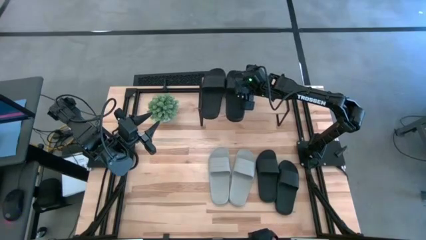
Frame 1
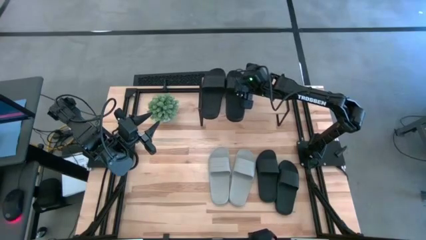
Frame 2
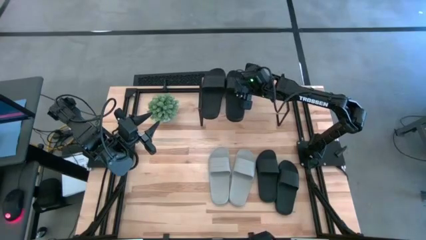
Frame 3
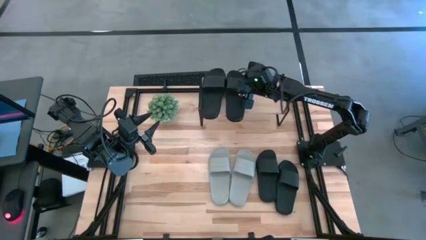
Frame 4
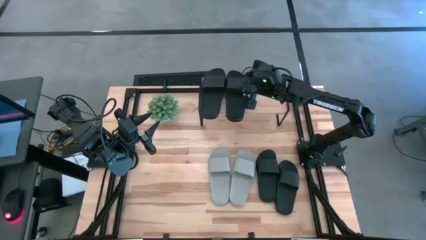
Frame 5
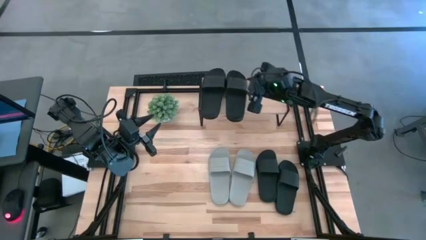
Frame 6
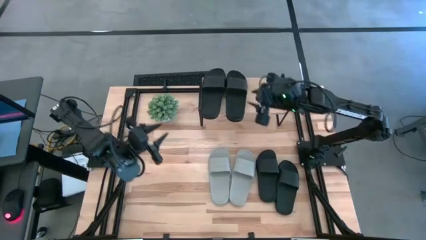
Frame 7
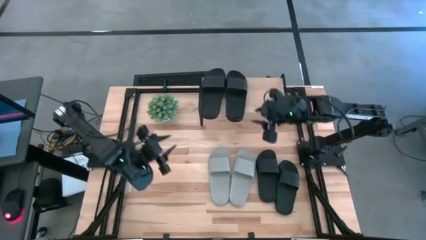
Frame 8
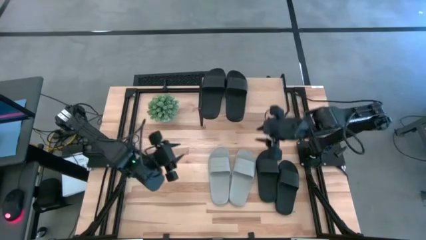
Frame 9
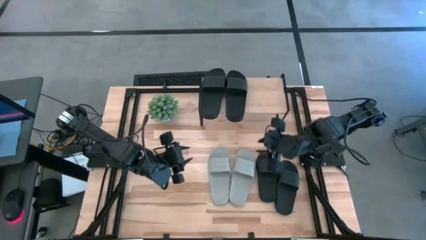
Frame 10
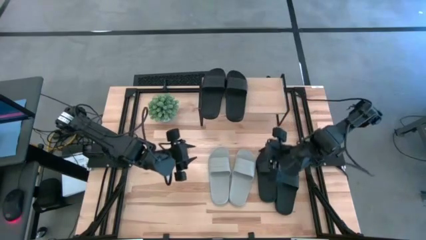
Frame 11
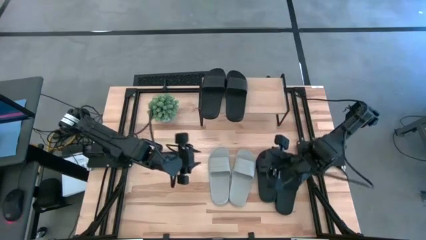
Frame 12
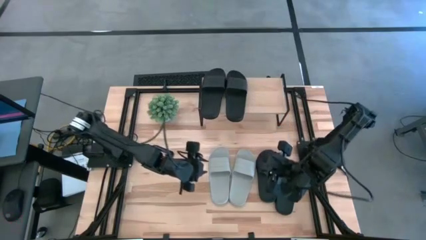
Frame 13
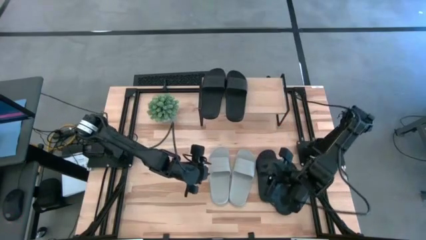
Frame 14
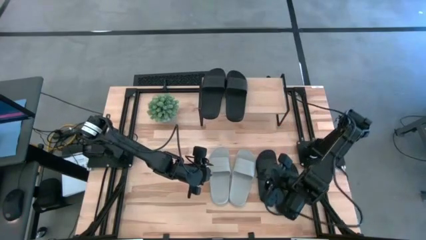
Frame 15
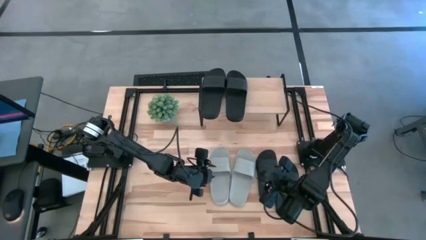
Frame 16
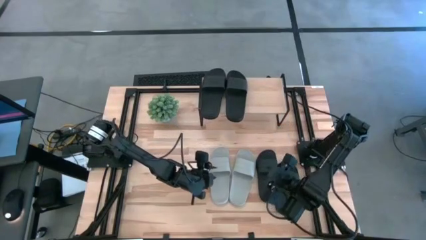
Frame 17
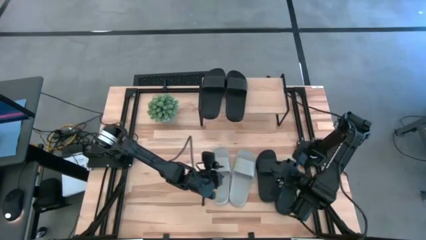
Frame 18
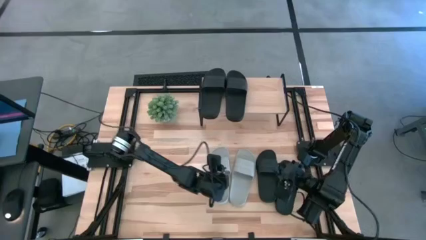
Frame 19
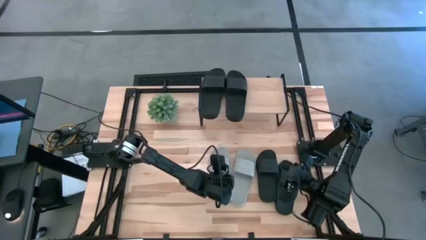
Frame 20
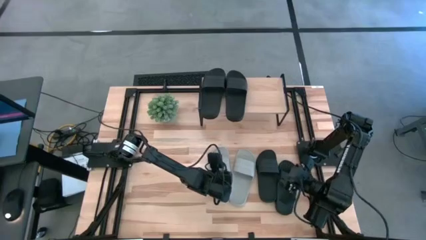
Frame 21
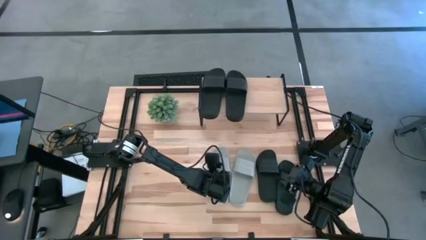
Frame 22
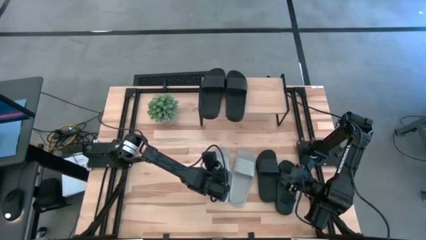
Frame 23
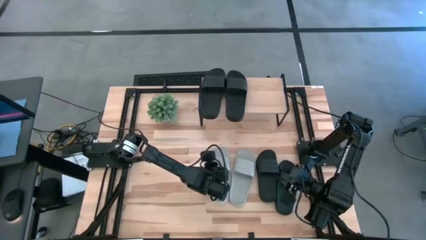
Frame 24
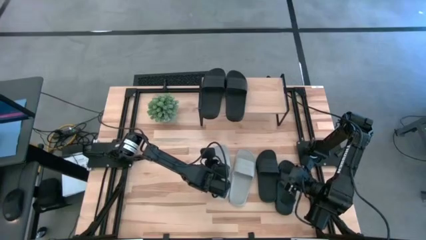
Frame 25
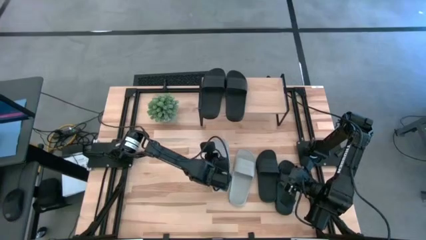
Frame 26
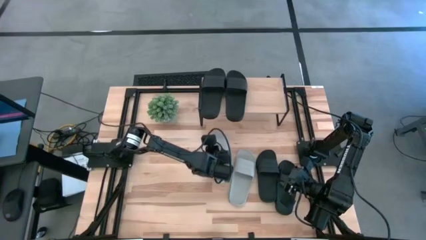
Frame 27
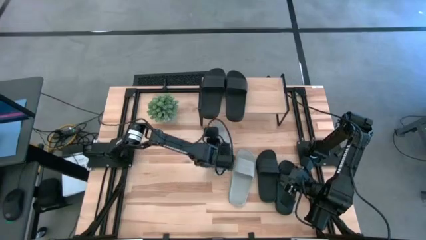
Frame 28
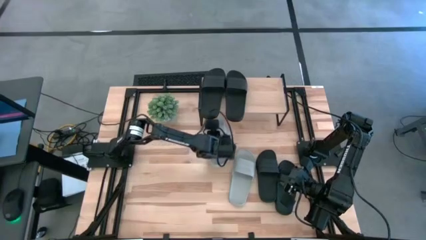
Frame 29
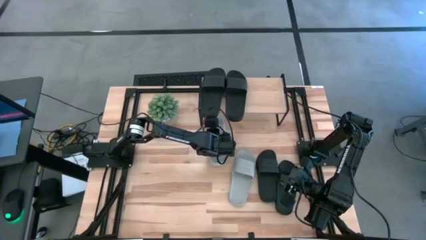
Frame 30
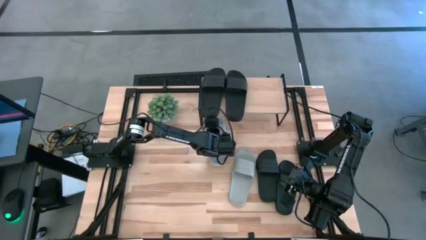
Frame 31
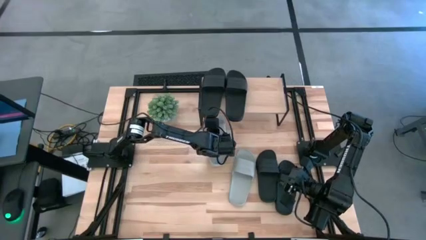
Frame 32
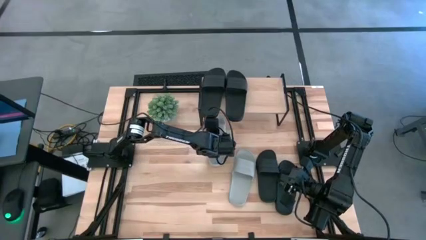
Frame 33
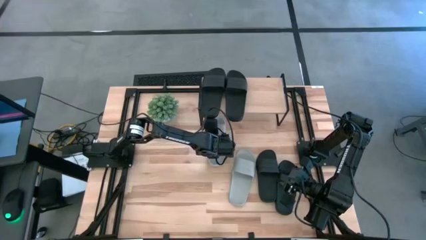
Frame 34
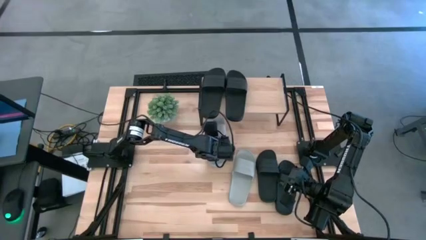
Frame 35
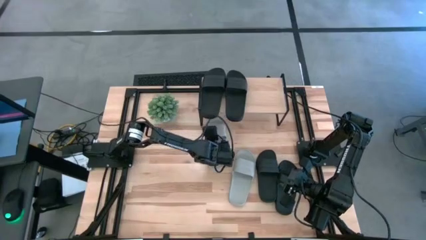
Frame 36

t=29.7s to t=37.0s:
Task: Pick and place slides into the shelf
Put the left gray slide under the shelf

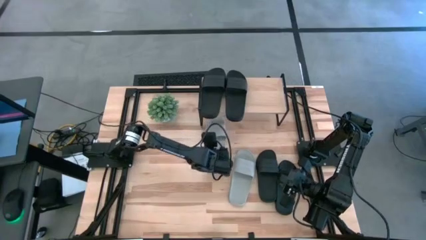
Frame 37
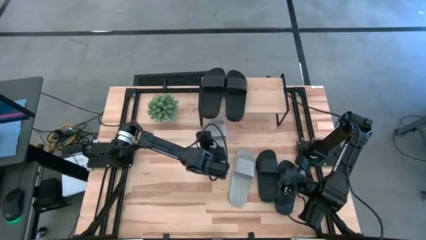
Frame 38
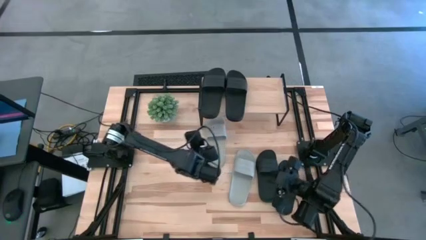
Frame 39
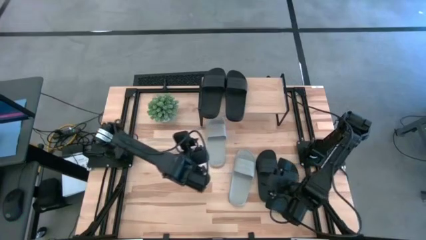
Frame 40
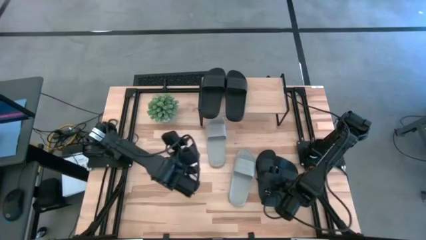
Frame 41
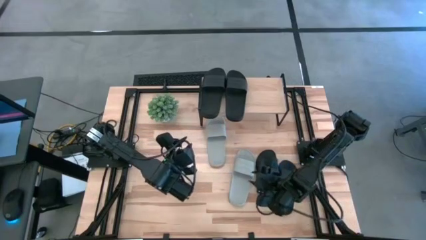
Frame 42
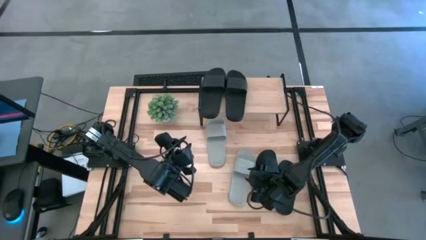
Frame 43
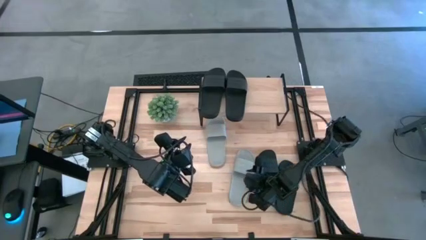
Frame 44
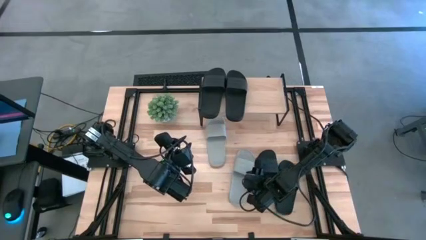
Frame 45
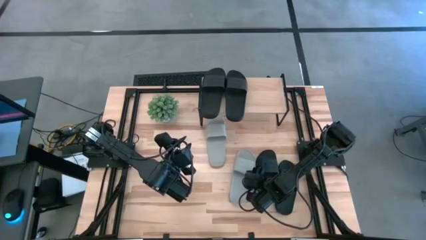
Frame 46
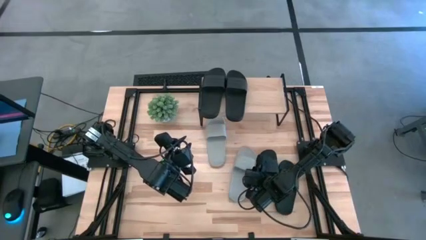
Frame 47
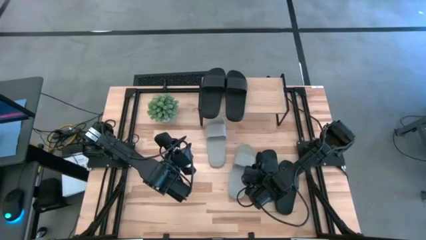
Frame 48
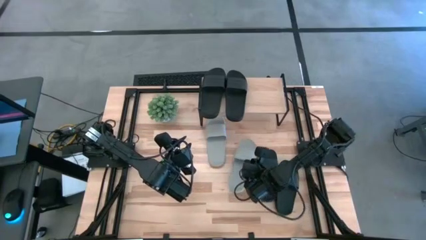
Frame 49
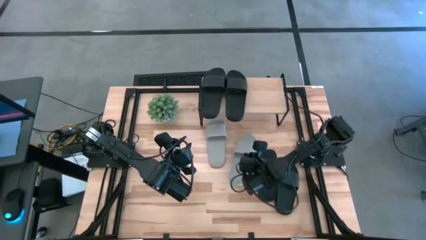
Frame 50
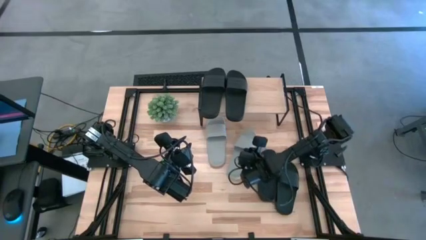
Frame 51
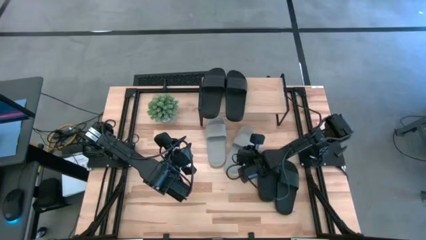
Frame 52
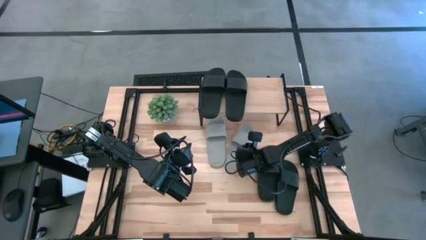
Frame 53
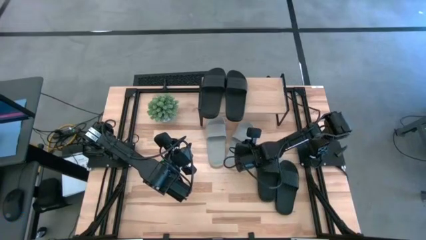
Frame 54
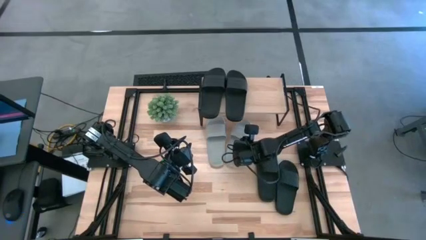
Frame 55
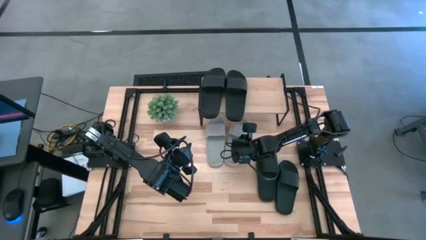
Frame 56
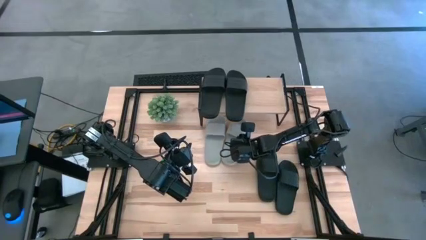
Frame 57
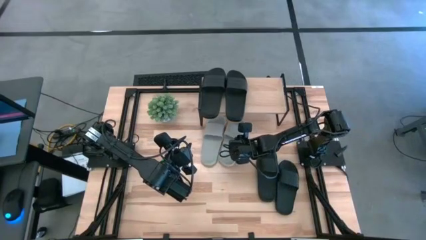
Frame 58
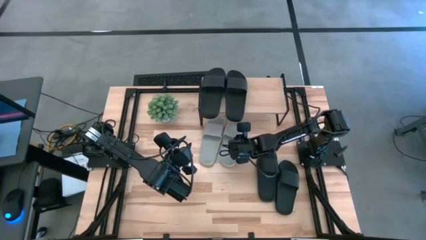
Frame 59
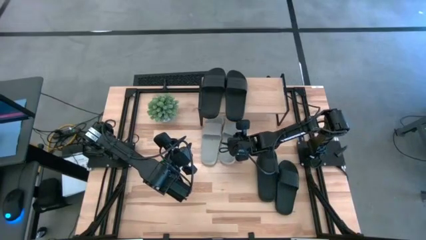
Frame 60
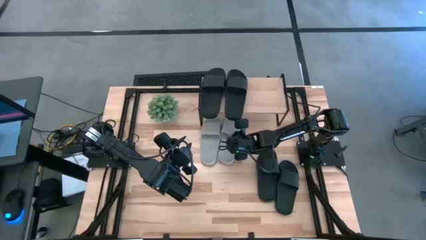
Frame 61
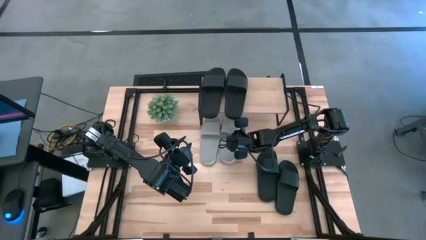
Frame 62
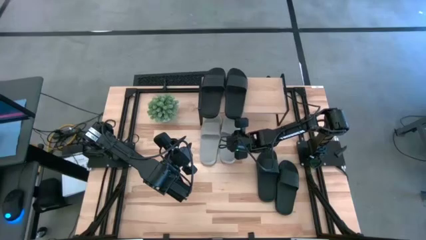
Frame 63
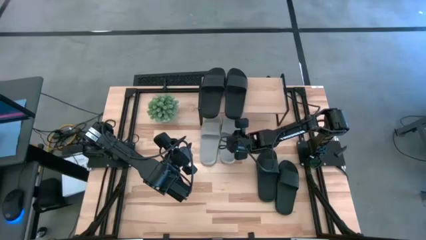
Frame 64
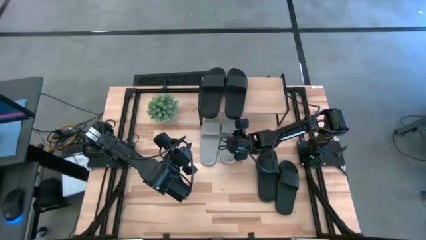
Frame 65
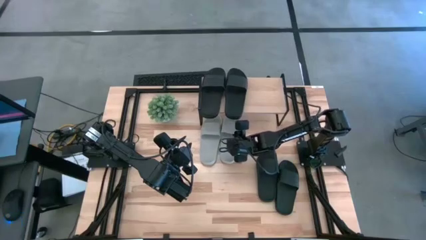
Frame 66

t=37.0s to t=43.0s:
Put the gray slide under the shelf

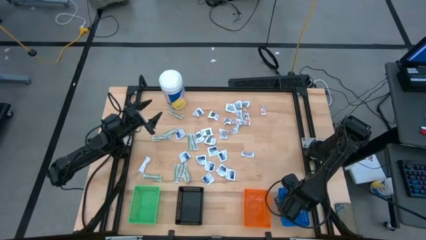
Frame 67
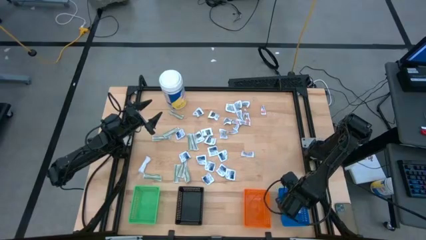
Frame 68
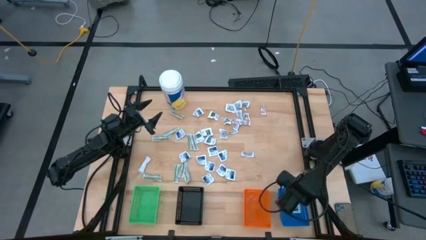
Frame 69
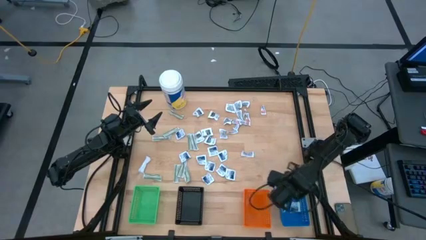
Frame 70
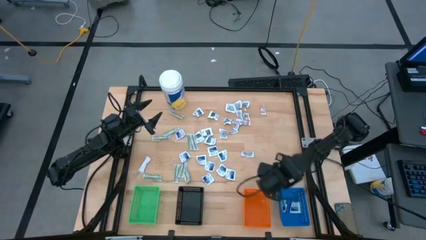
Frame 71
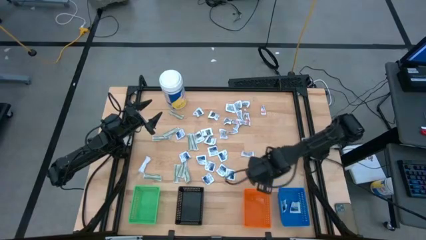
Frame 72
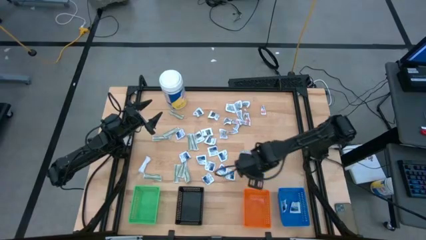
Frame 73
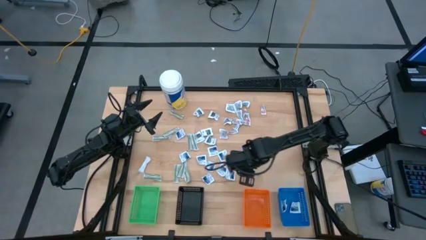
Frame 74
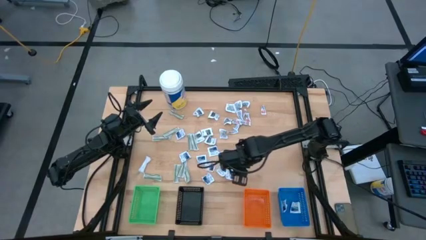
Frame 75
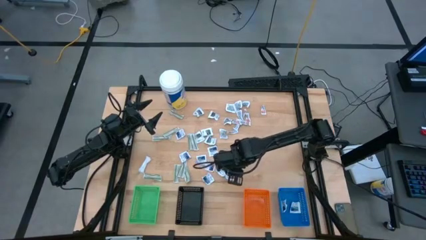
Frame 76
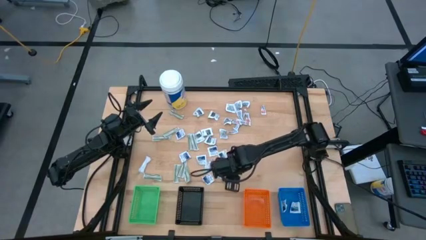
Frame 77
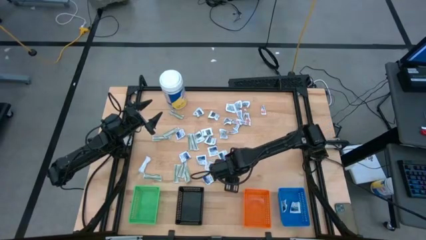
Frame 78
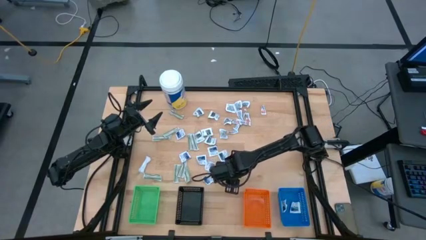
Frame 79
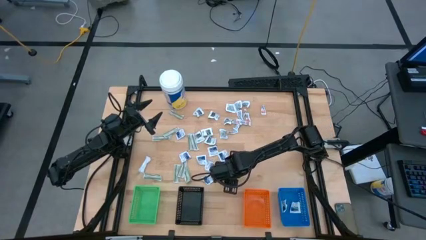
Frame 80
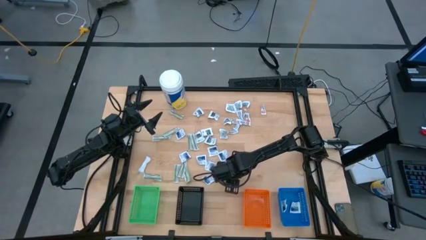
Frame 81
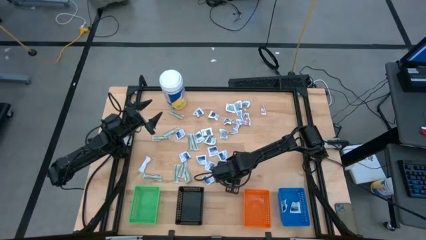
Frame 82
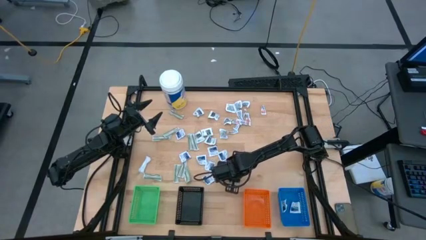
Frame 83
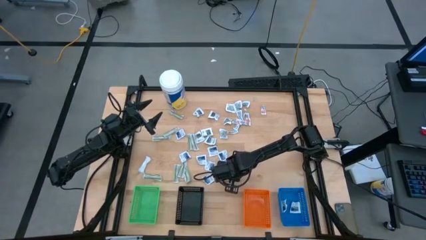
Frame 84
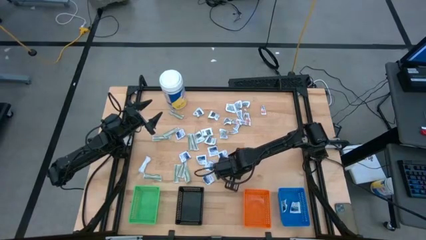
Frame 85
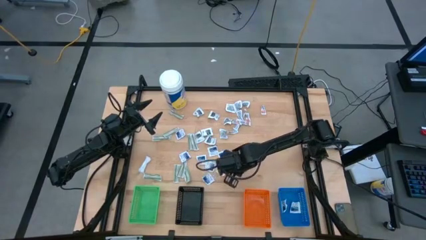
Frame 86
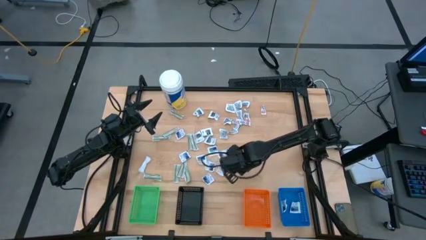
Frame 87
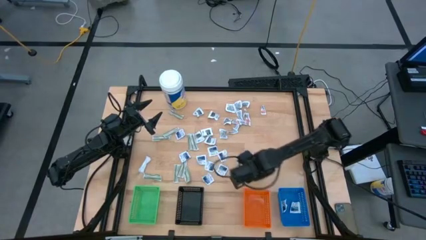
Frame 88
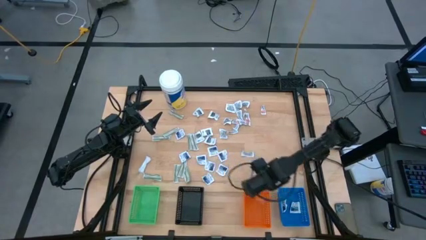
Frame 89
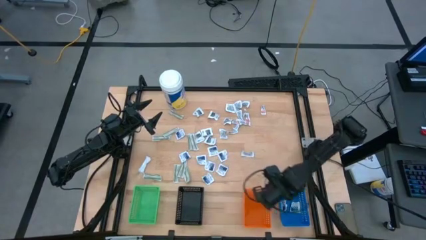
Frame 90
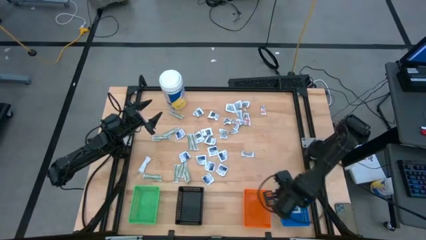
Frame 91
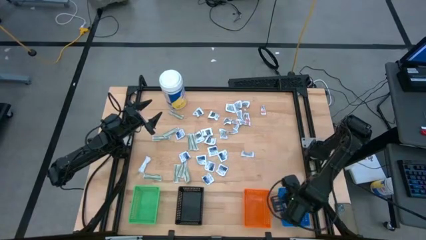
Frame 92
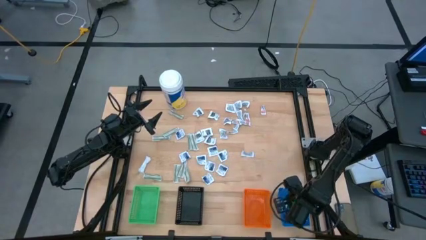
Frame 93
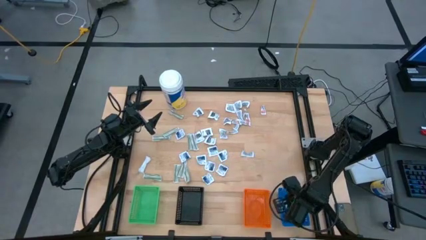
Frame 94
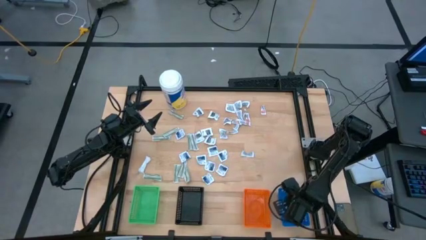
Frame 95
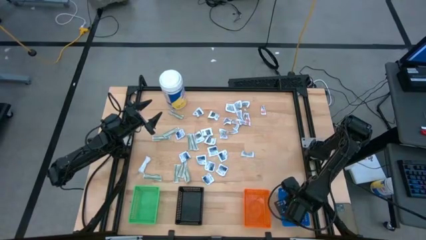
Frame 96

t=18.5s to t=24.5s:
Task: Pick & Place First Aid Supplies
Put the alcohol pad into the blue bin
